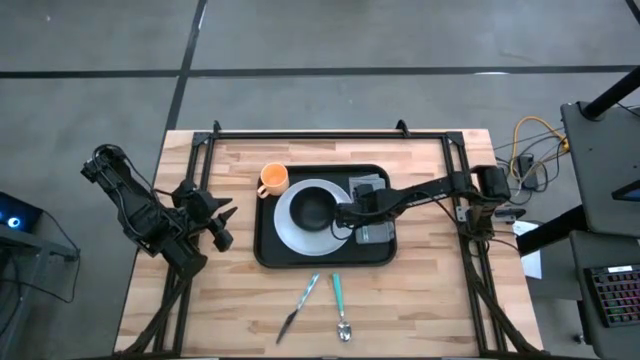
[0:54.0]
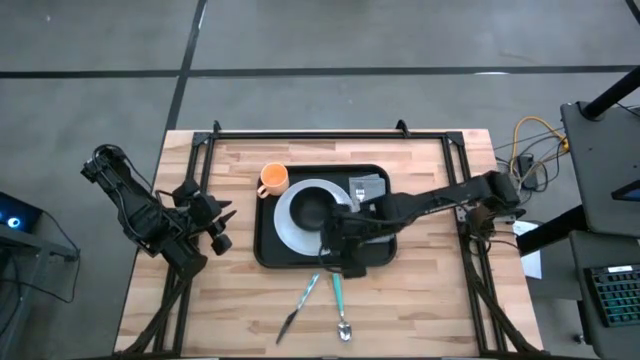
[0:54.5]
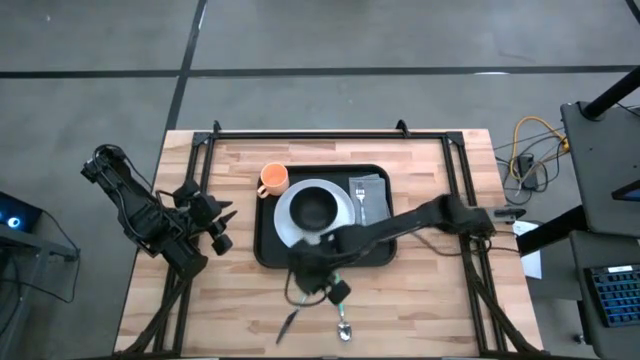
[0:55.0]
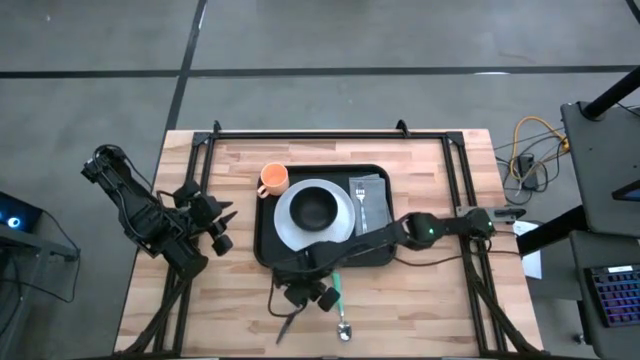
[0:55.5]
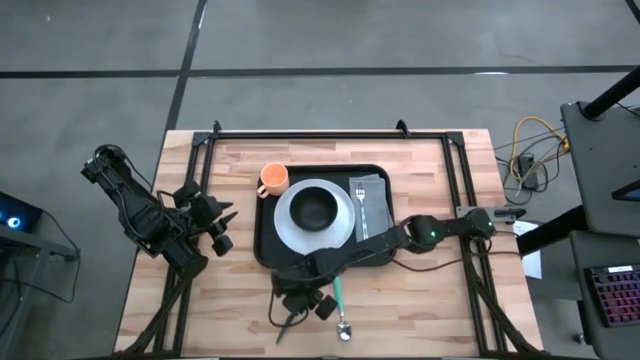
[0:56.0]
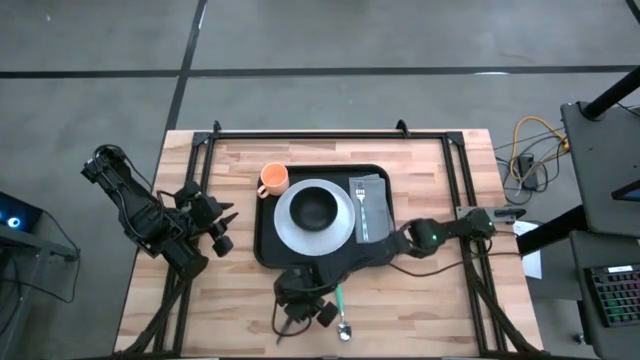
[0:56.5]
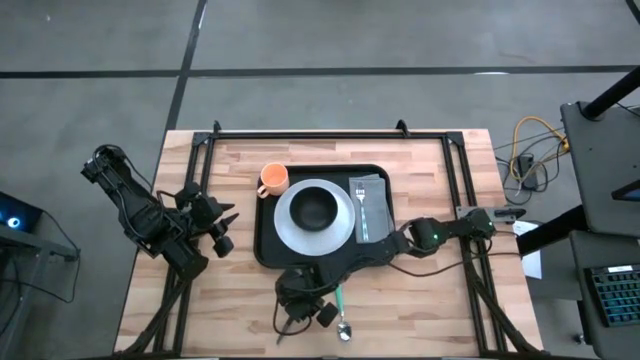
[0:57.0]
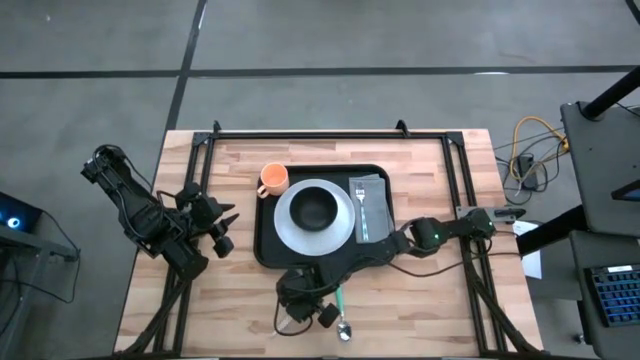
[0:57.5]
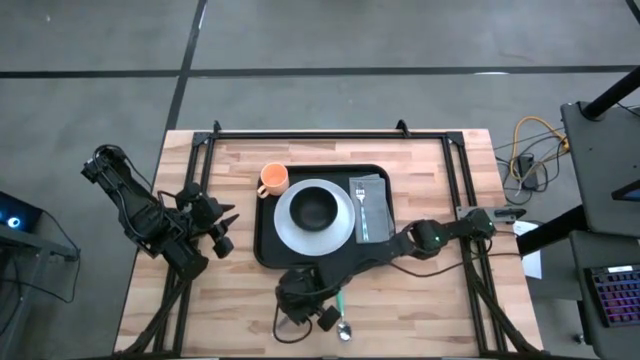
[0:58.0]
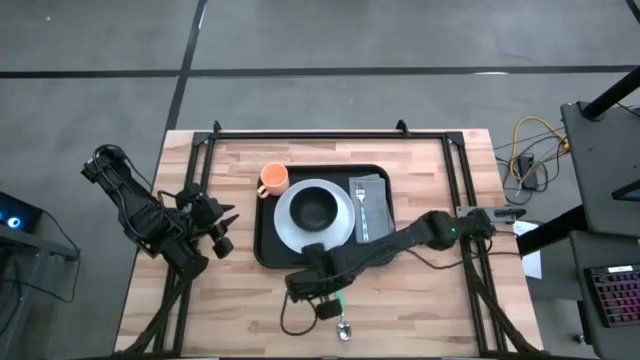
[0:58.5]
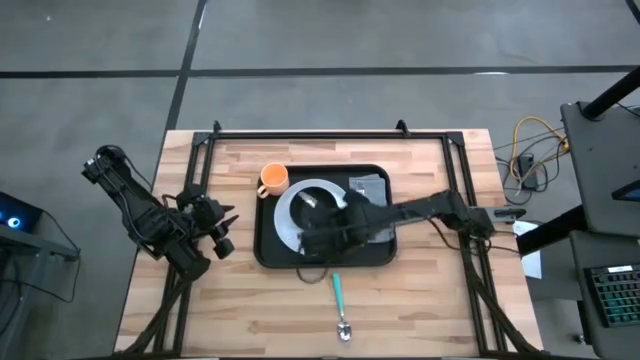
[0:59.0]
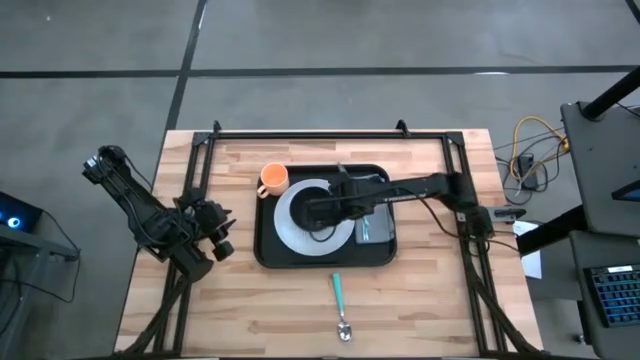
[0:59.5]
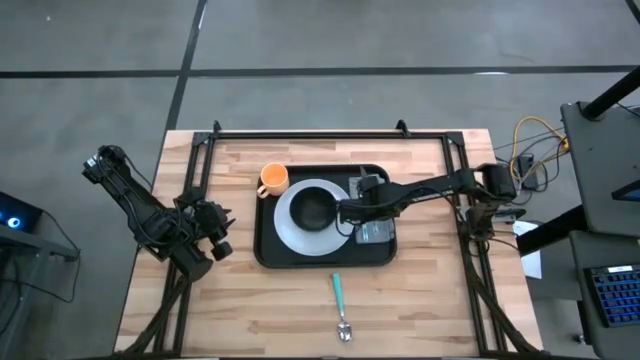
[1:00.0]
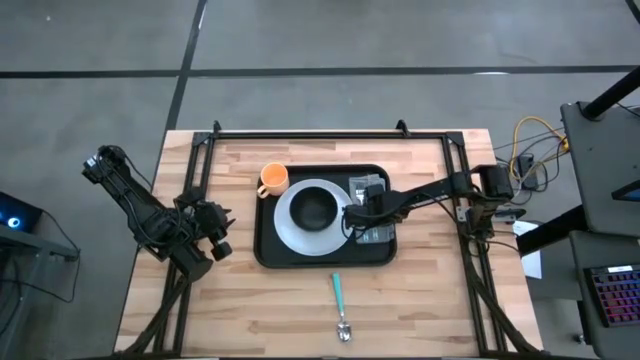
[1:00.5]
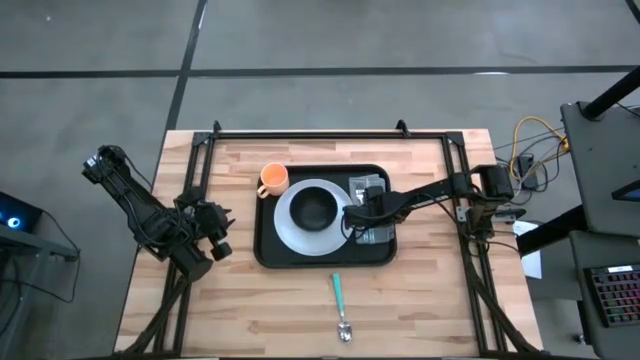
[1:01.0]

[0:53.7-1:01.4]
Task: Set up tray
Put the blue knife on the gray napkin to the right of the blue fork

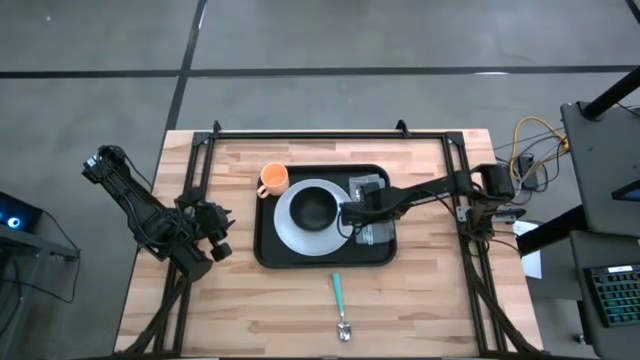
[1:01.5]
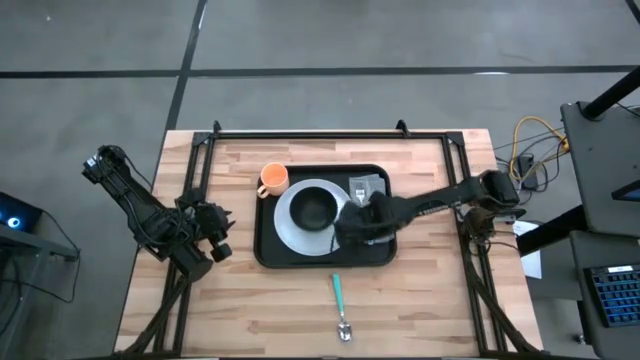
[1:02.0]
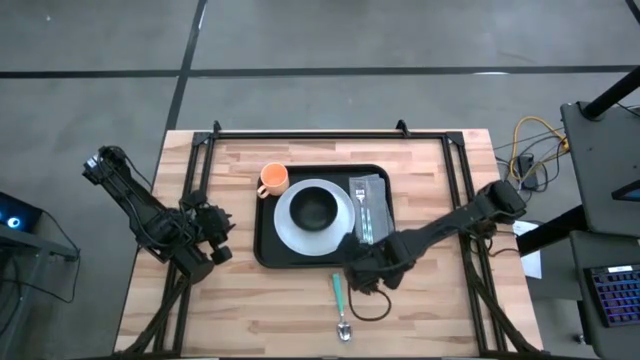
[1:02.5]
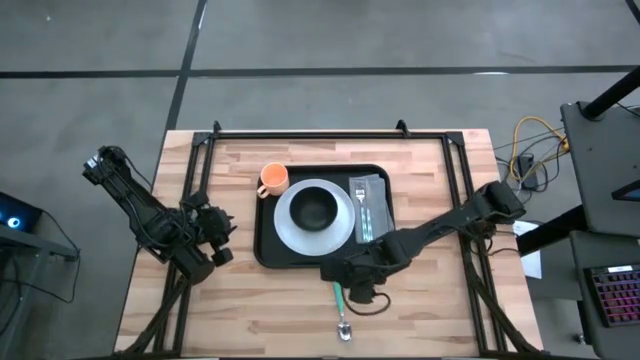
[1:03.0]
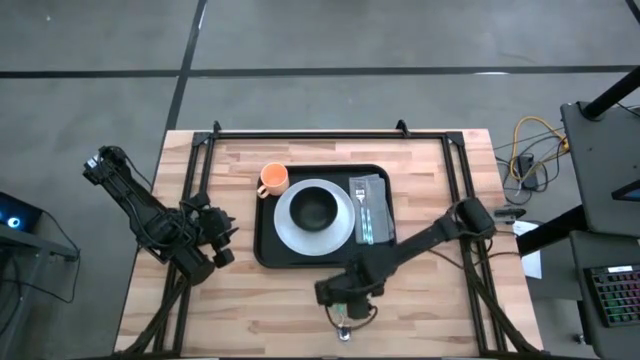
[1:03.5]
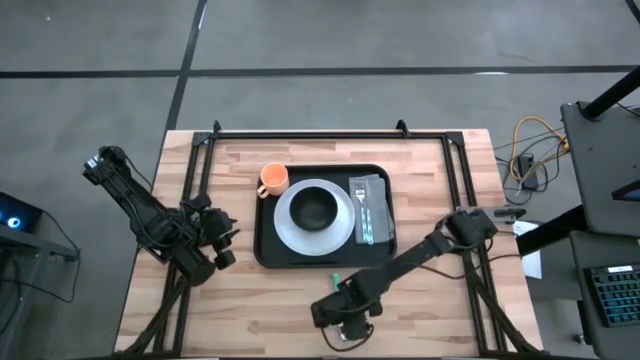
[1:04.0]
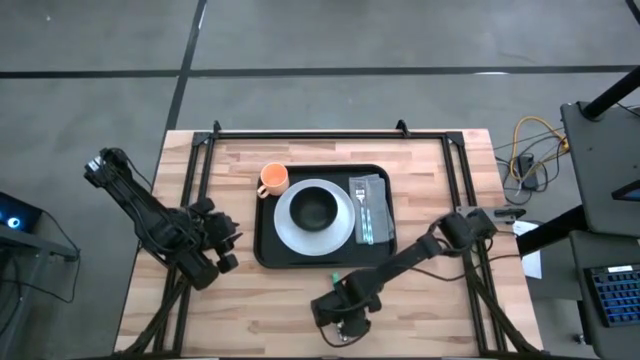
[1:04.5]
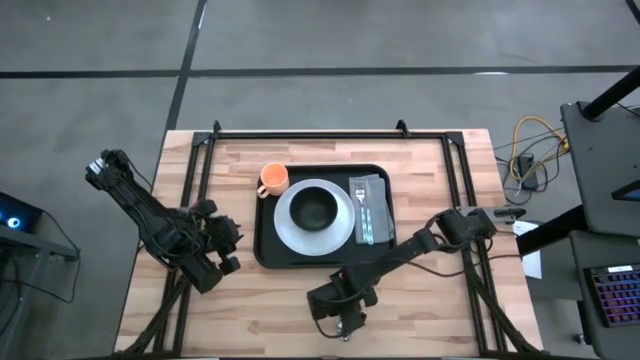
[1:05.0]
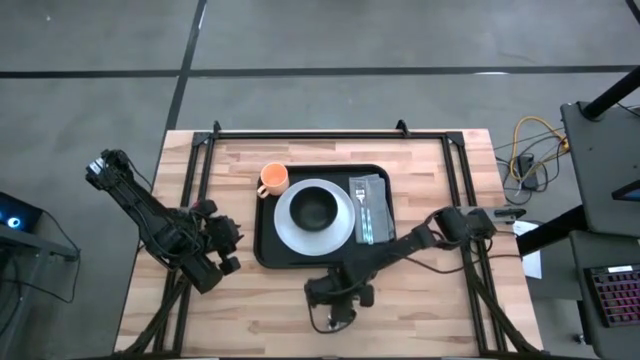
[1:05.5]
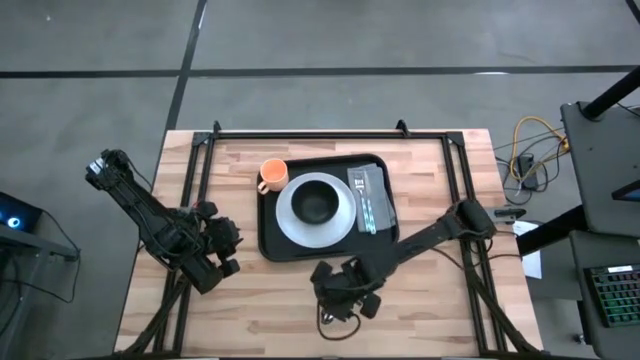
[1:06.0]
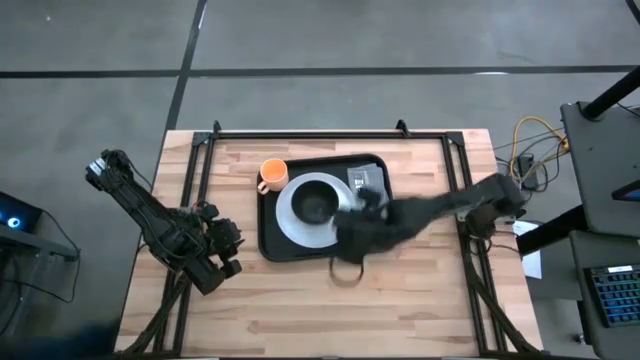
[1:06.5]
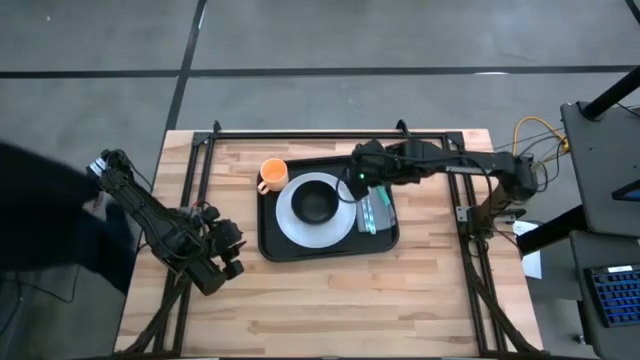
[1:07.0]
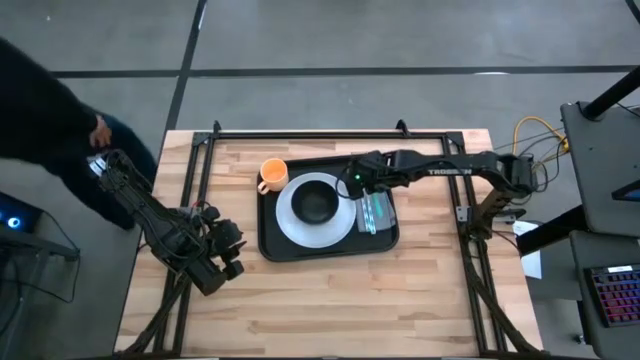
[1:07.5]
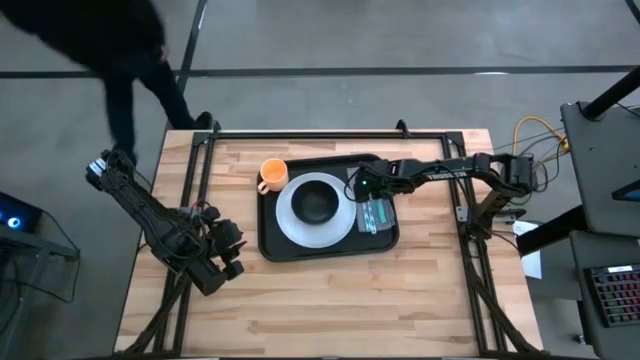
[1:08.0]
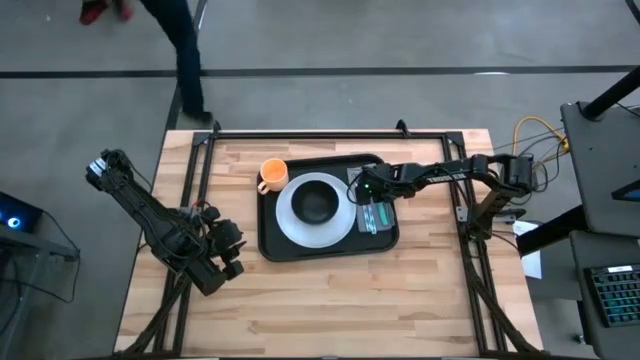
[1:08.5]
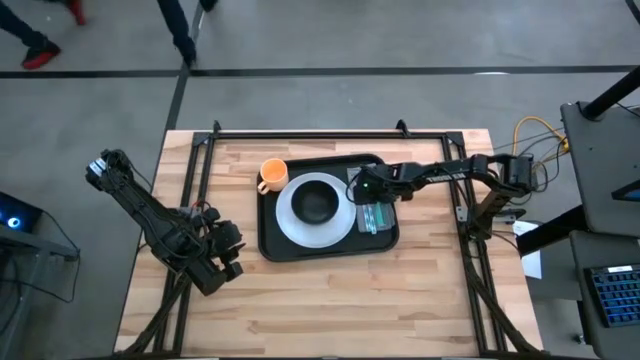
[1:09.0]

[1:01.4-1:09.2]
Put the blue spoon on the gray napkin to the right of the blue knife

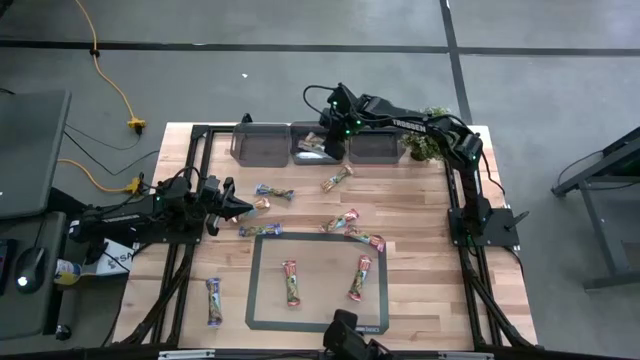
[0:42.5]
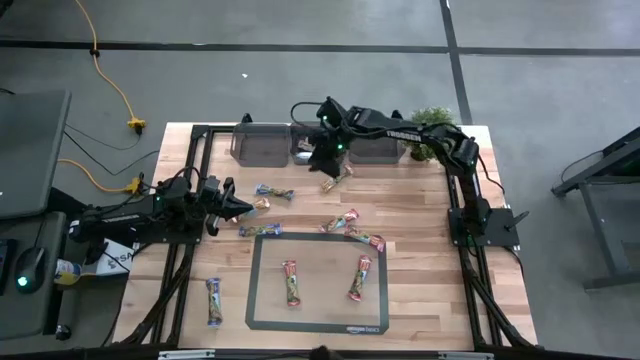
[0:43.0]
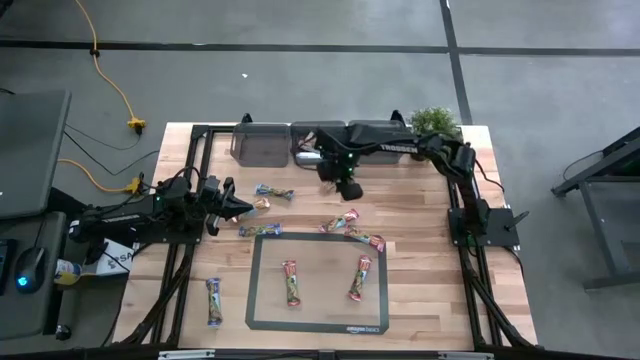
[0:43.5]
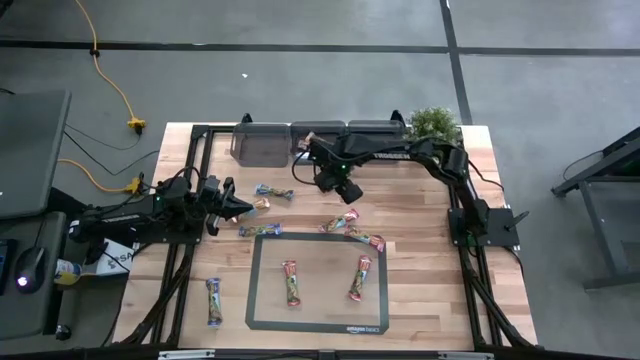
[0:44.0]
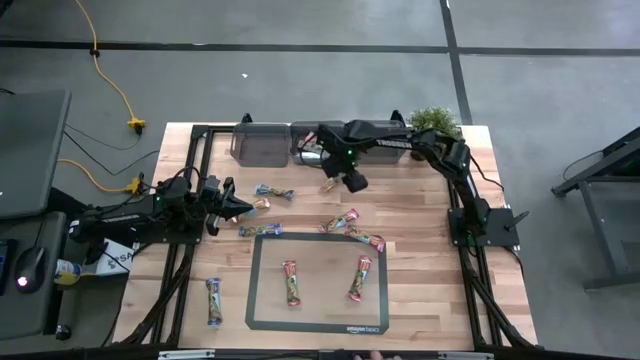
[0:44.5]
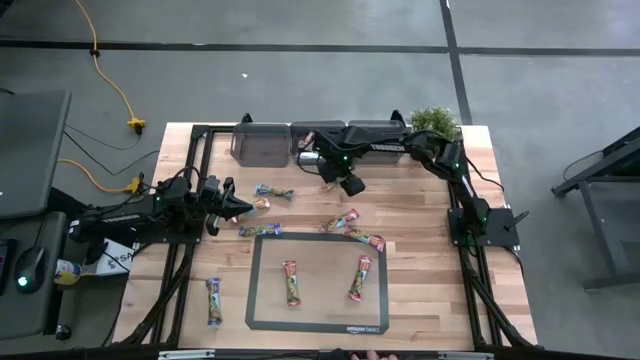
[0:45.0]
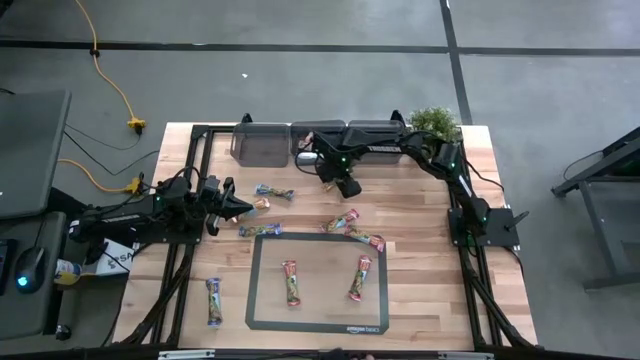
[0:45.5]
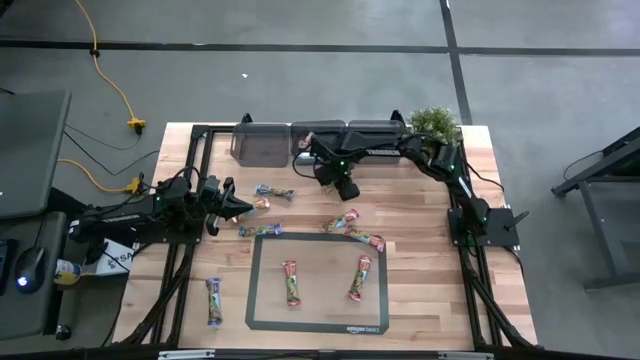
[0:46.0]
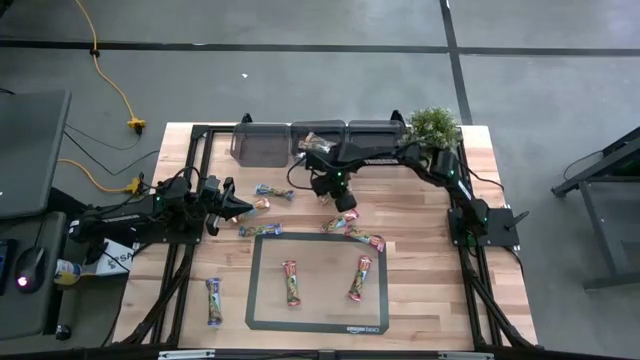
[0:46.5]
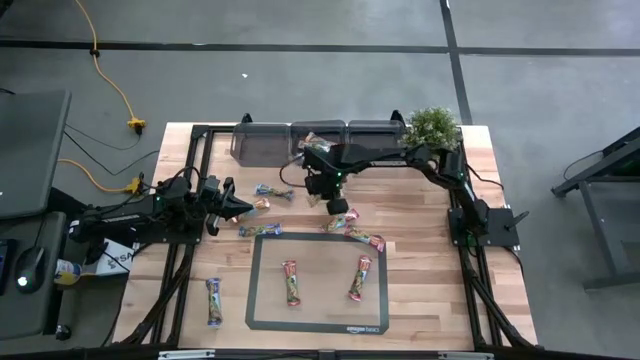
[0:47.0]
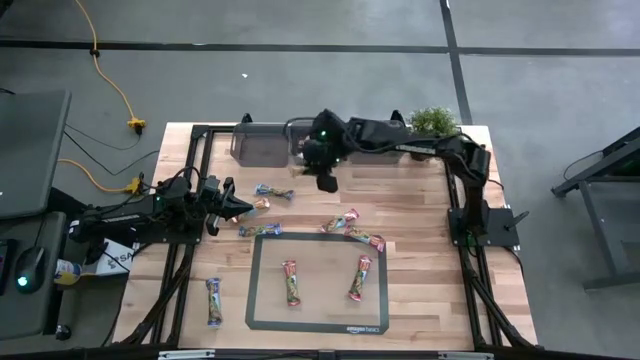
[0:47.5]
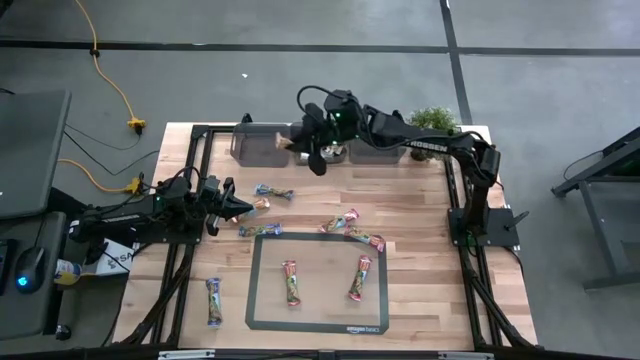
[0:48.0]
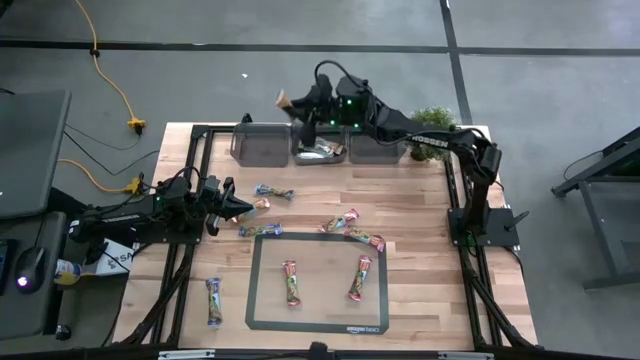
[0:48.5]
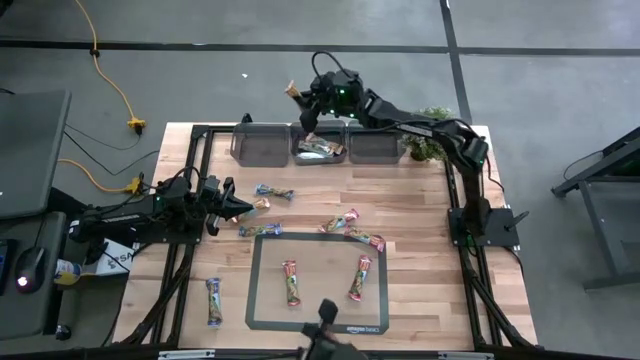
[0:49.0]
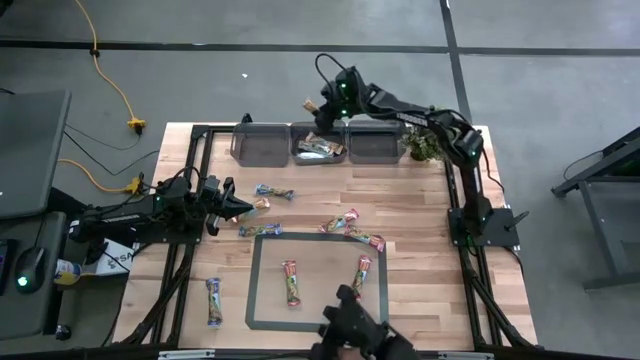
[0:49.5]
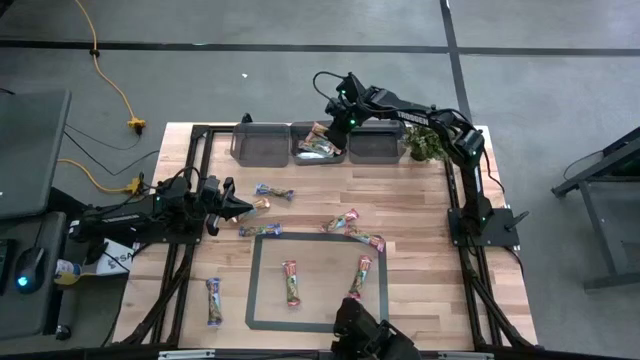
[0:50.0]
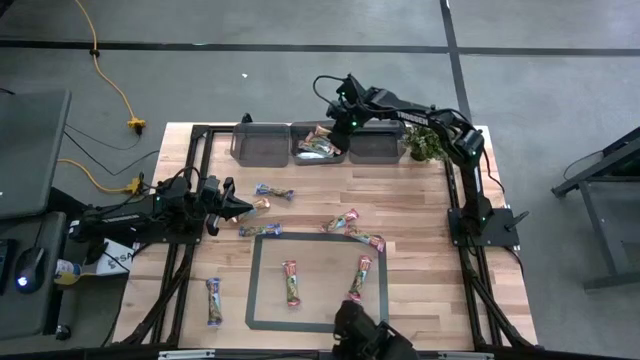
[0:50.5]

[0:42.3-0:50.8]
Task: Pick and place Granola Bars by type
Put the yellow granola bar into the middle black bin
